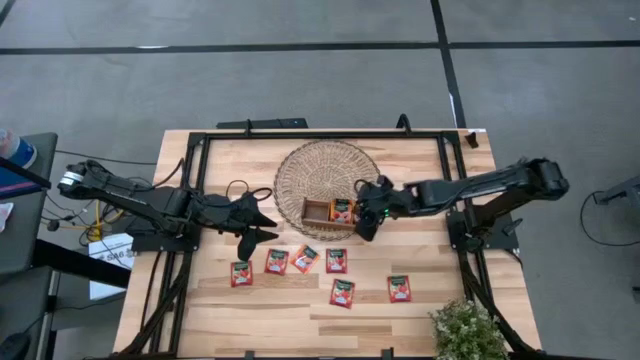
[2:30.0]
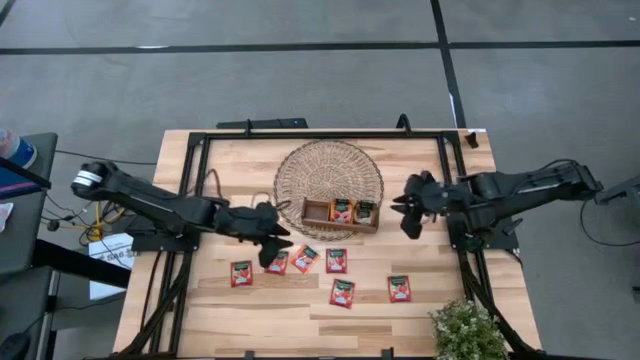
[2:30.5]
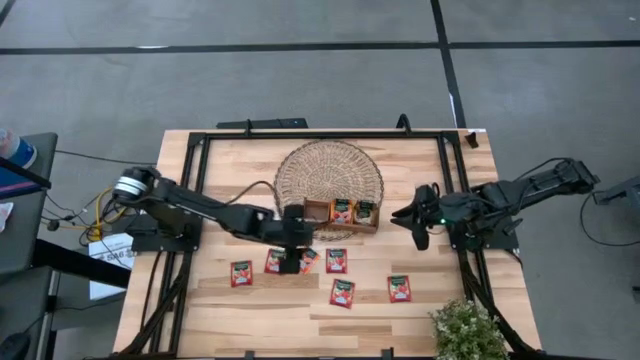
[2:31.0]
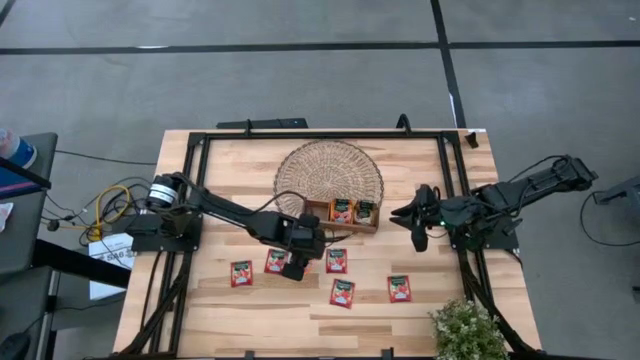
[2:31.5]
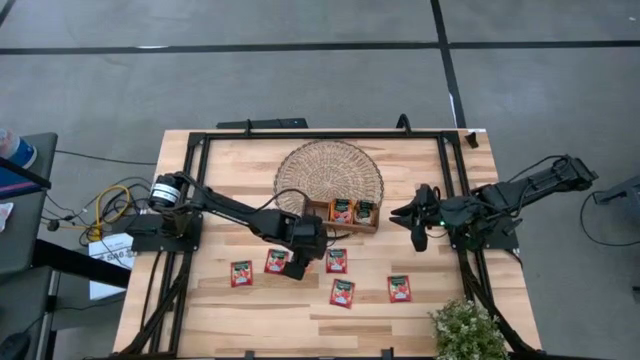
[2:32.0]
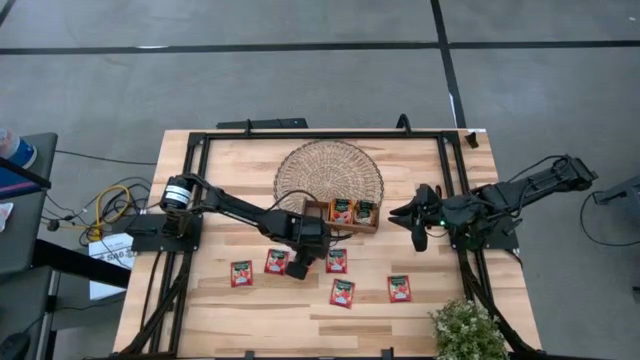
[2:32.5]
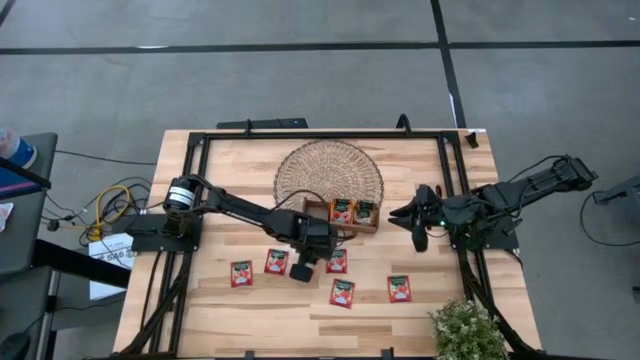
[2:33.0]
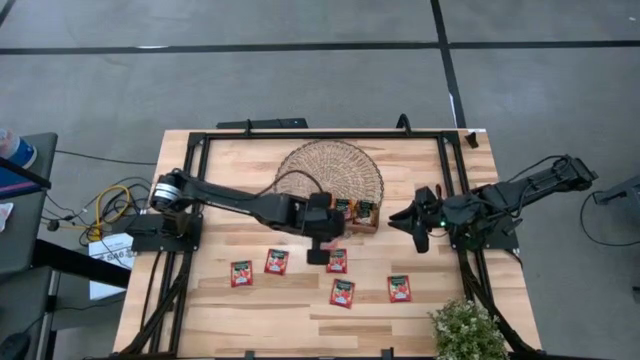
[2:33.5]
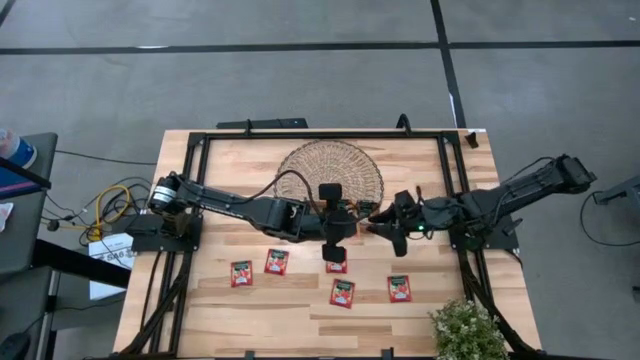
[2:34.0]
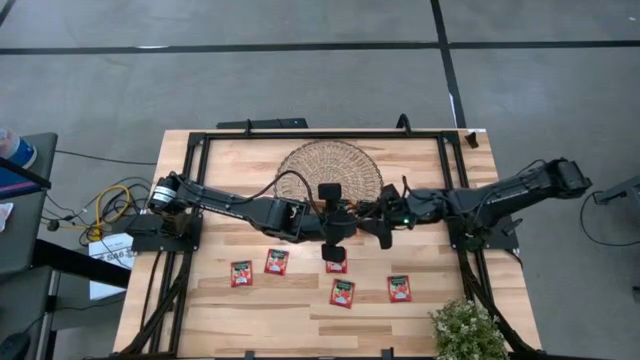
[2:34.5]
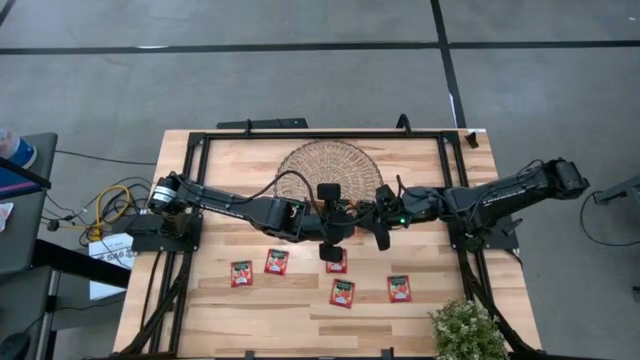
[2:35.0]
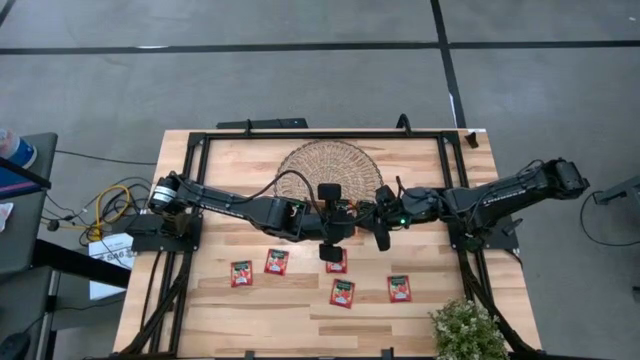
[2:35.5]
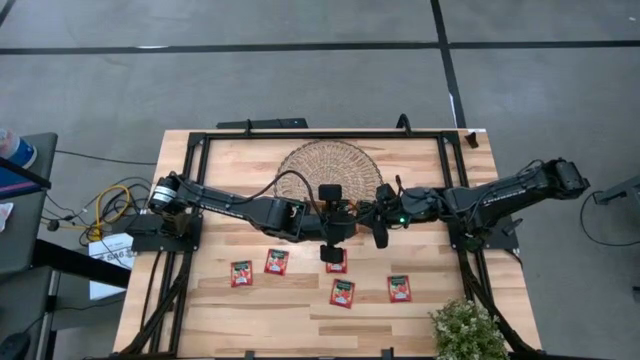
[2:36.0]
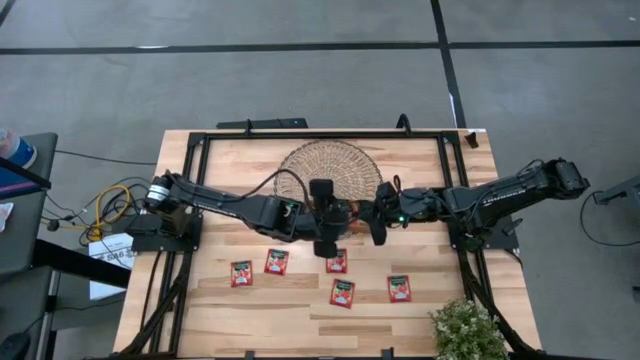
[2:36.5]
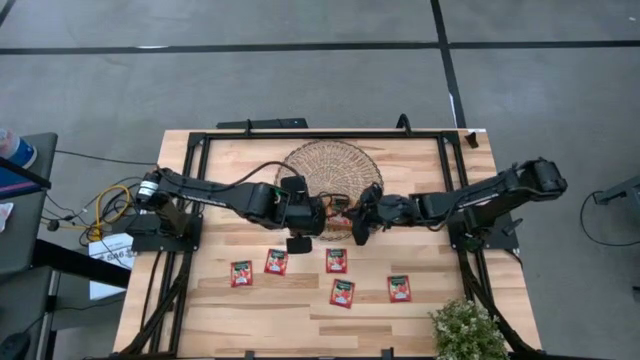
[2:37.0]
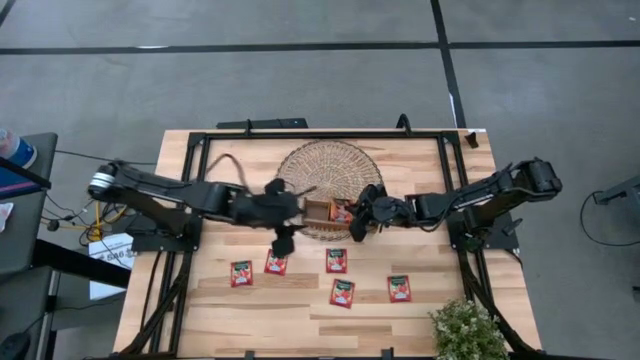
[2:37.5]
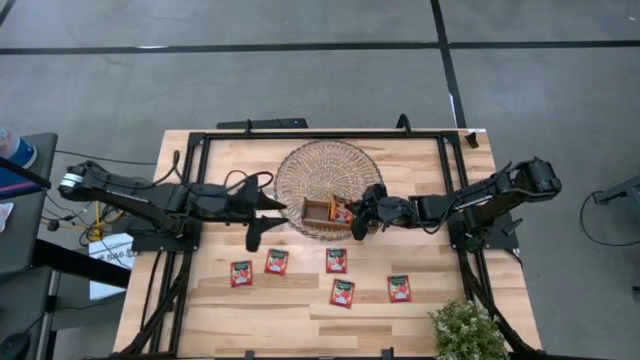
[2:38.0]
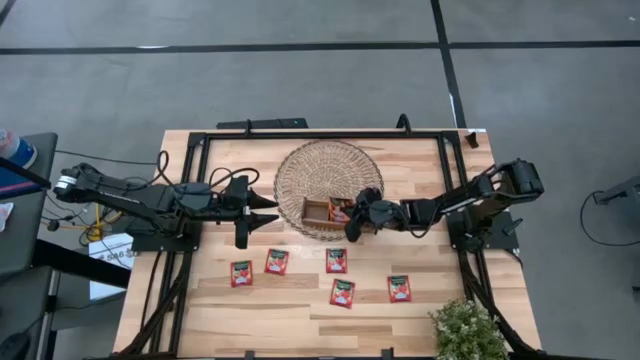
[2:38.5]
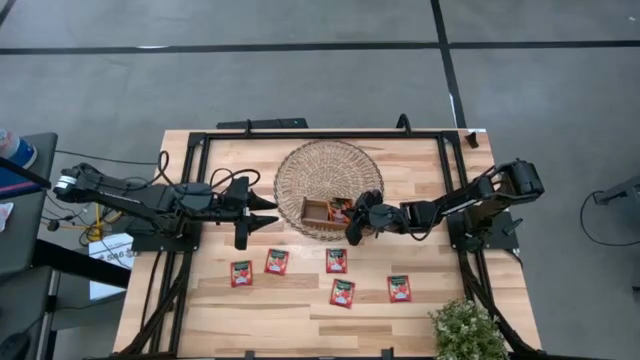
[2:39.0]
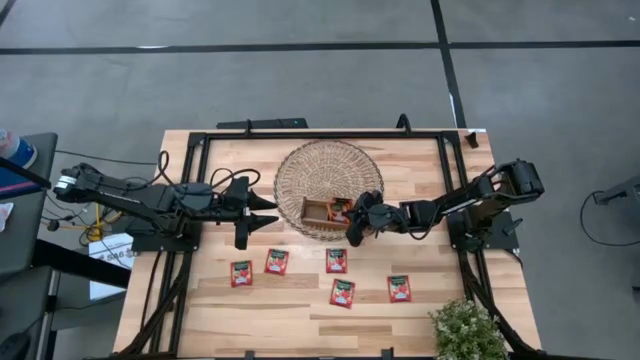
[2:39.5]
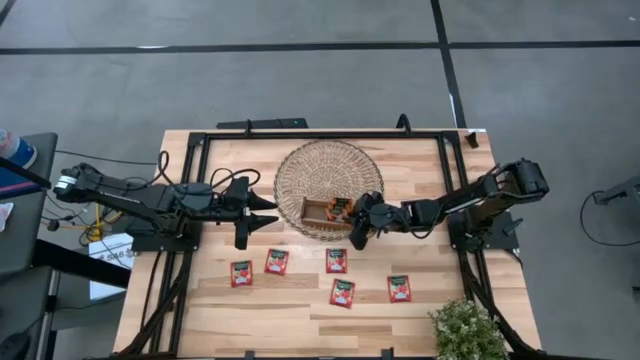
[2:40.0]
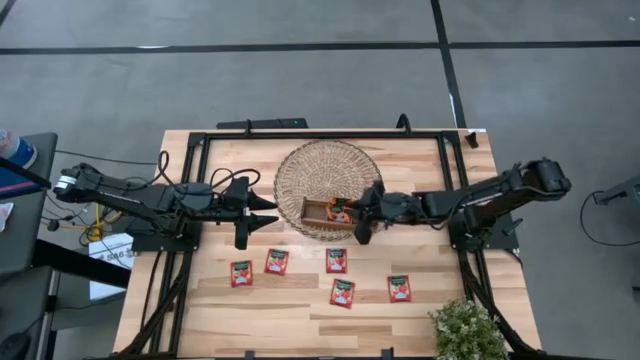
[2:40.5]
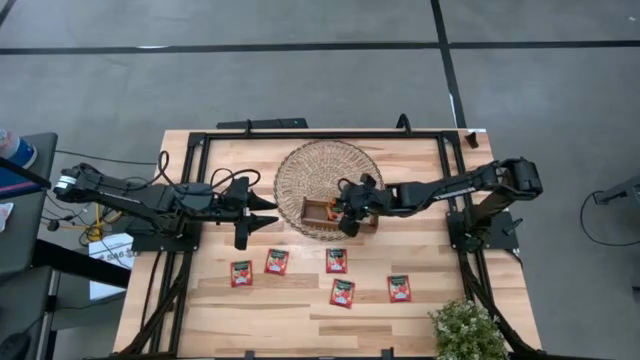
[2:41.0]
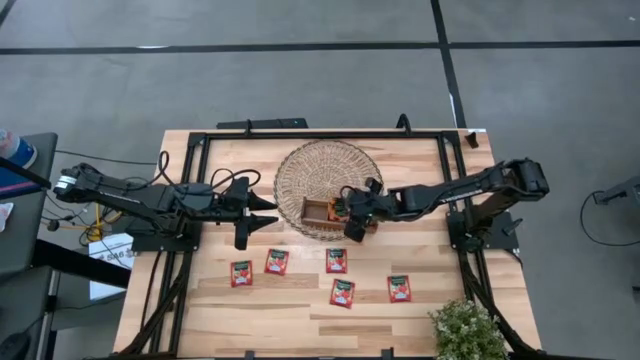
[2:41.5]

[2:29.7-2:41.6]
Task: Pick & Place Tea
Put the orange tea bag into the middle section of the wooden organizer

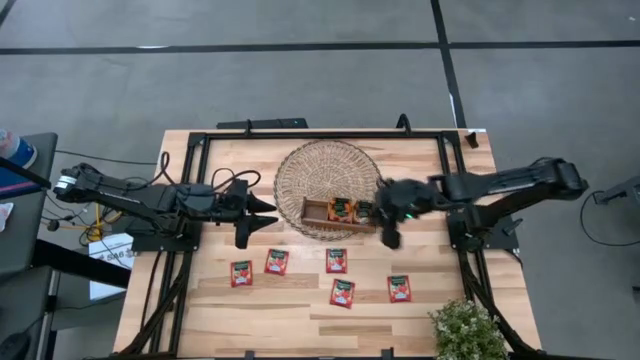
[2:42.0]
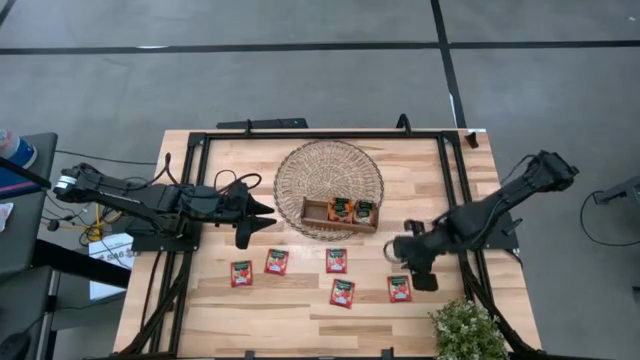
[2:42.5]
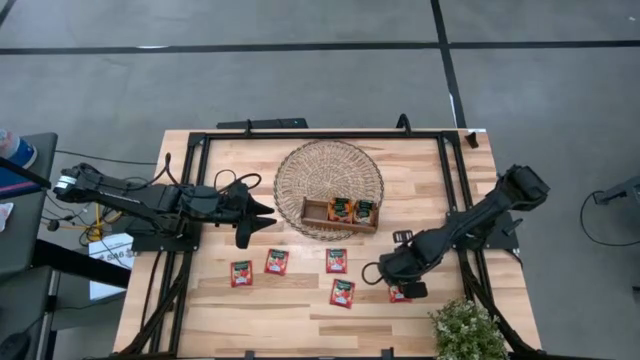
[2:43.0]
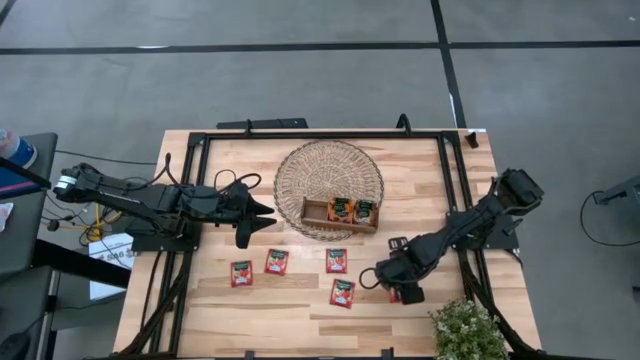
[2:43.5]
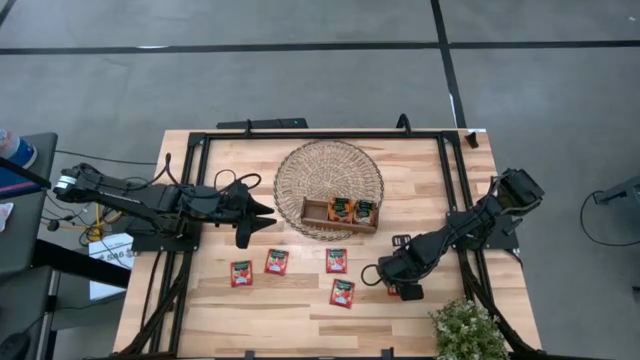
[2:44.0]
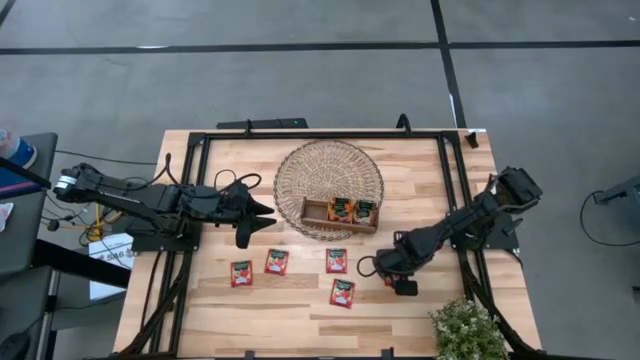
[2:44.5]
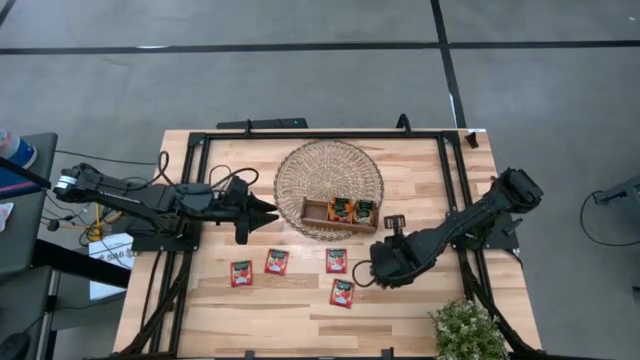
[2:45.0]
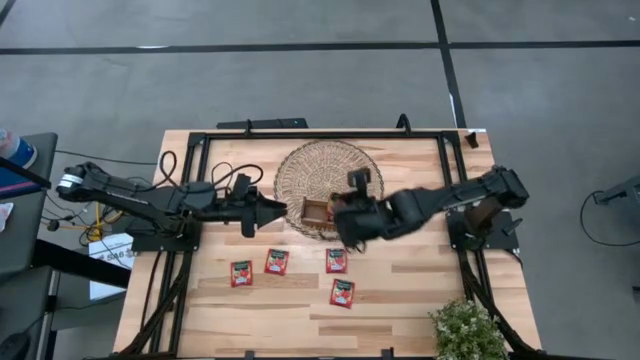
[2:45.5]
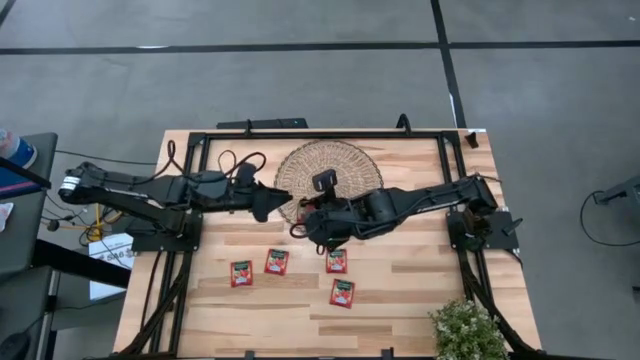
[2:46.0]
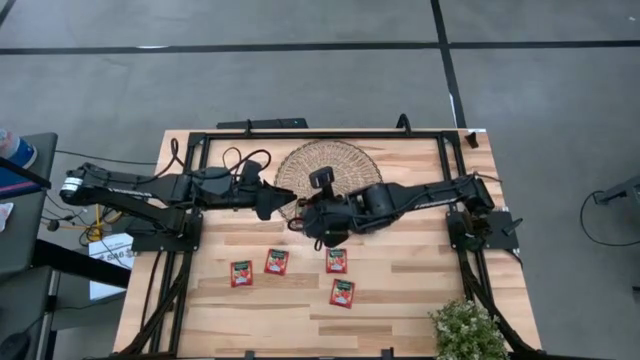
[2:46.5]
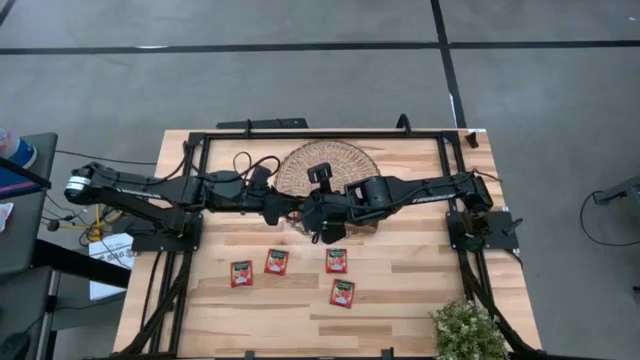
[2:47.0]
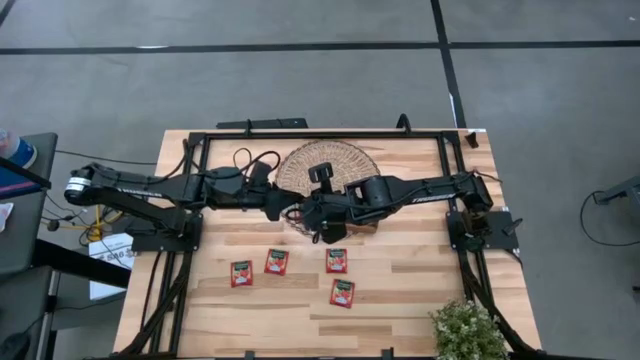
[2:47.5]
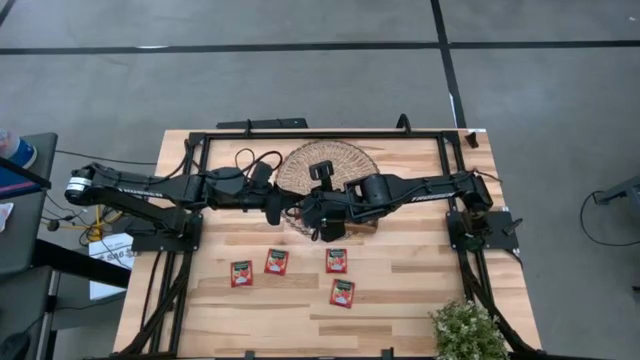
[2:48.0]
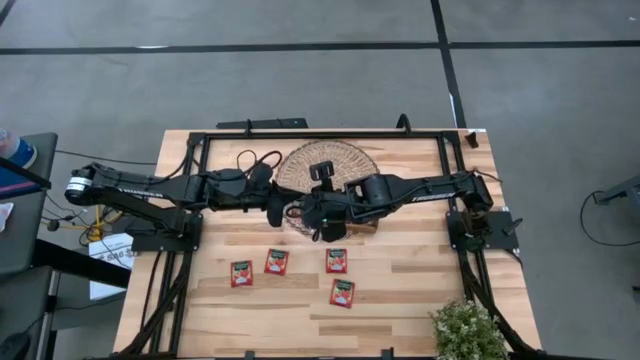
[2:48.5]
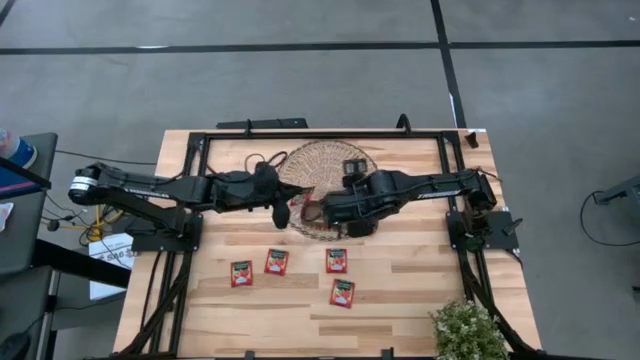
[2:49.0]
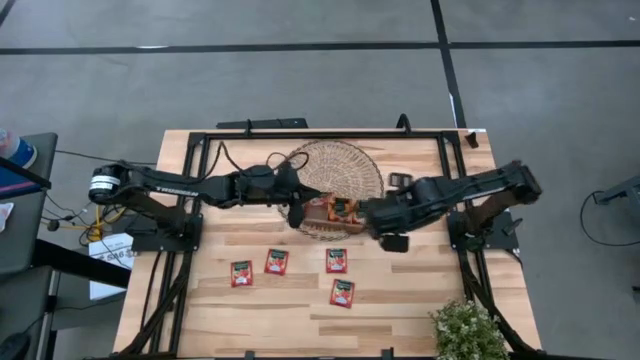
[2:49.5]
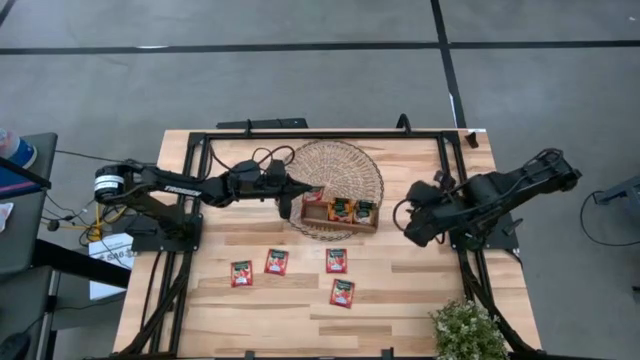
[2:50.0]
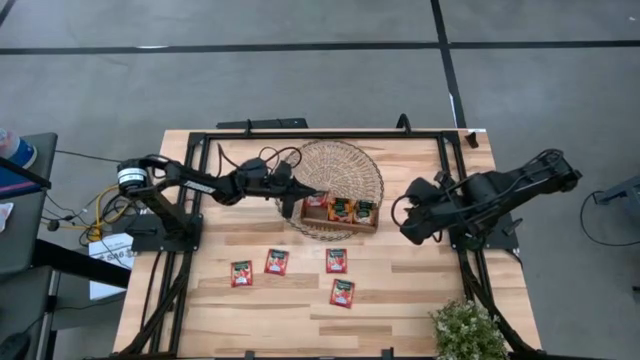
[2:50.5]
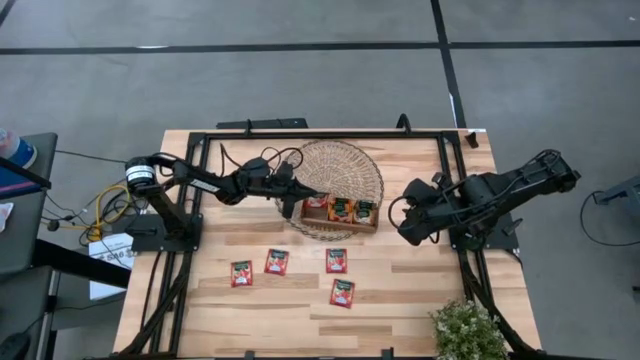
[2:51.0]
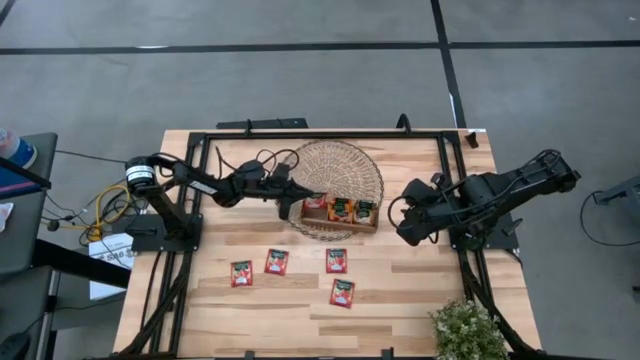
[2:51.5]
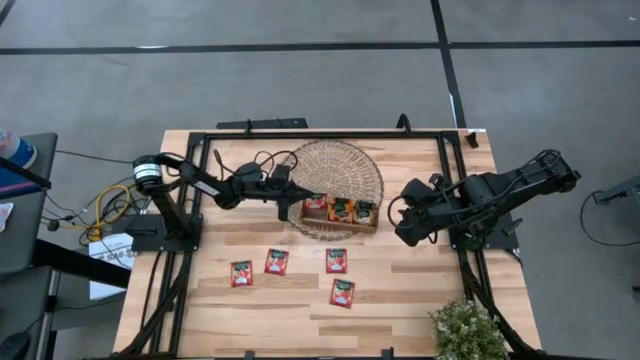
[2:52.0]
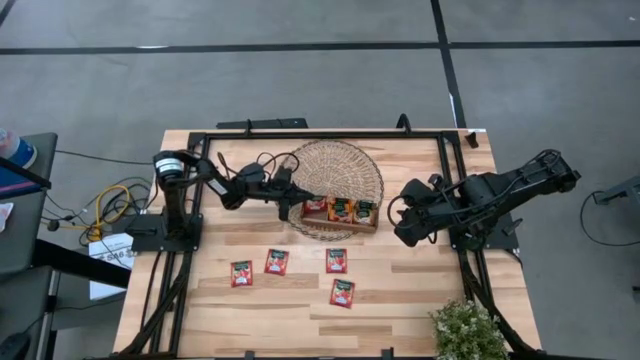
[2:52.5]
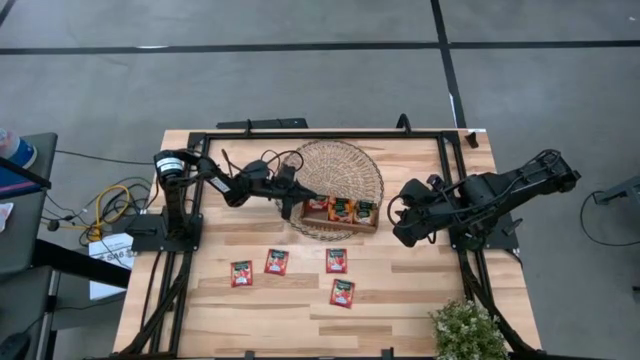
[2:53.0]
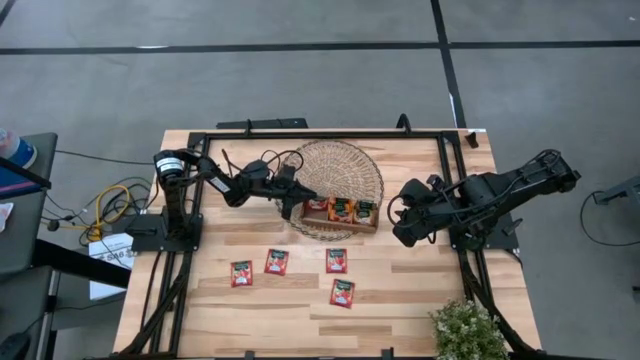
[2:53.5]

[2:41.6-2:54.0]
Put the red tea bag into the left section of the wooden organizer
